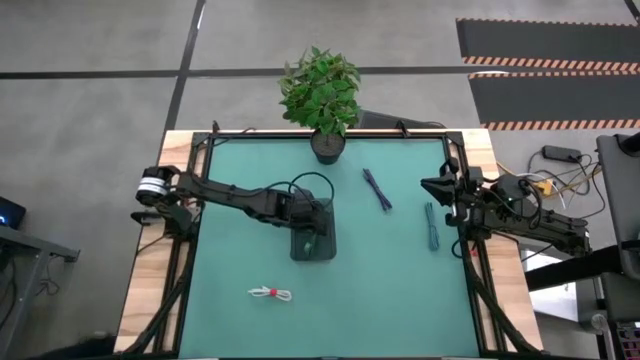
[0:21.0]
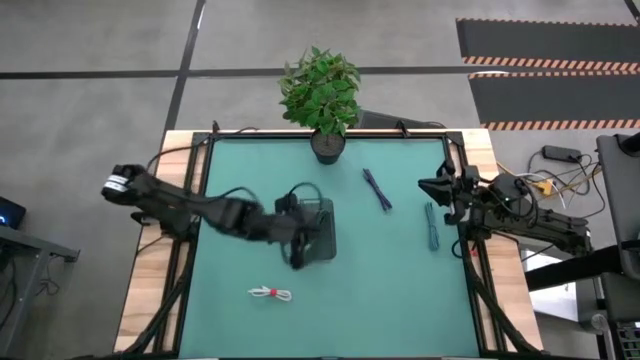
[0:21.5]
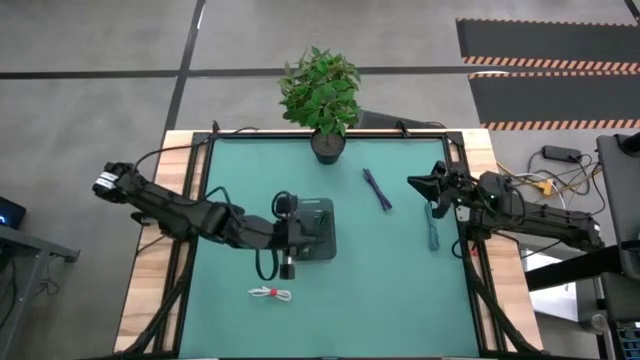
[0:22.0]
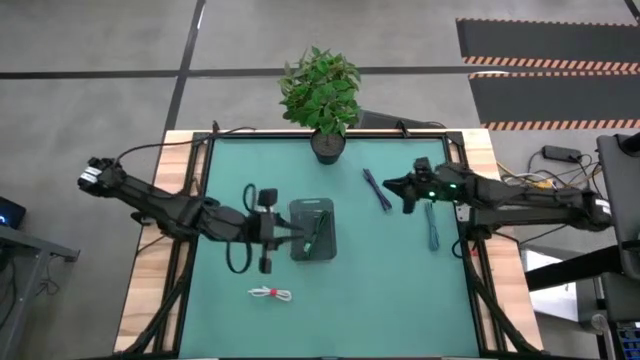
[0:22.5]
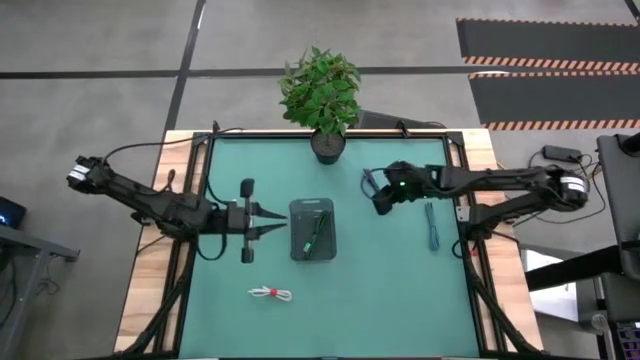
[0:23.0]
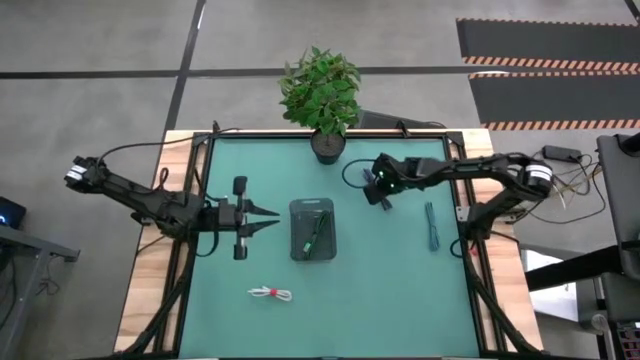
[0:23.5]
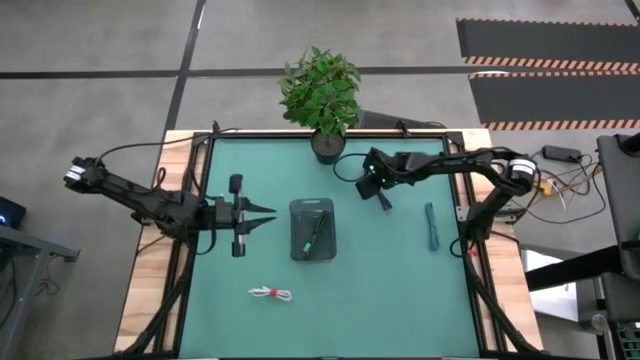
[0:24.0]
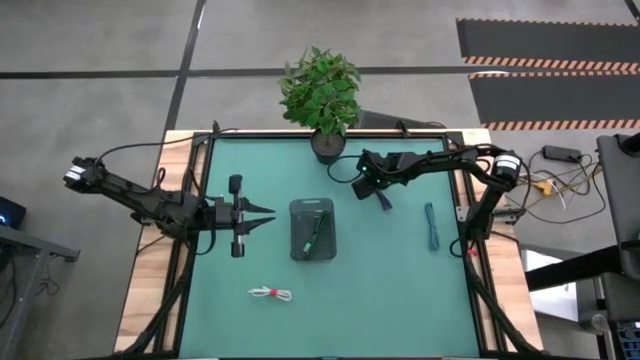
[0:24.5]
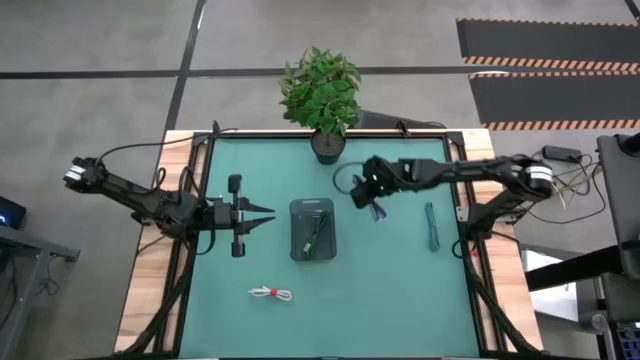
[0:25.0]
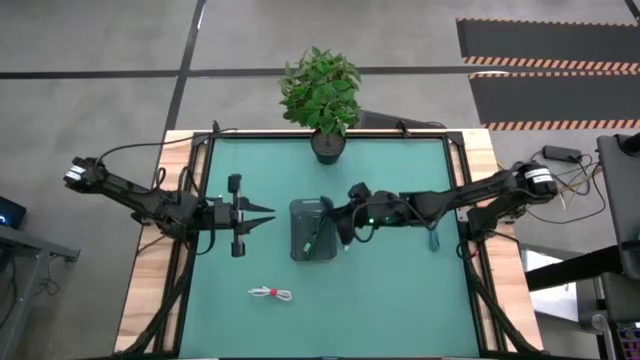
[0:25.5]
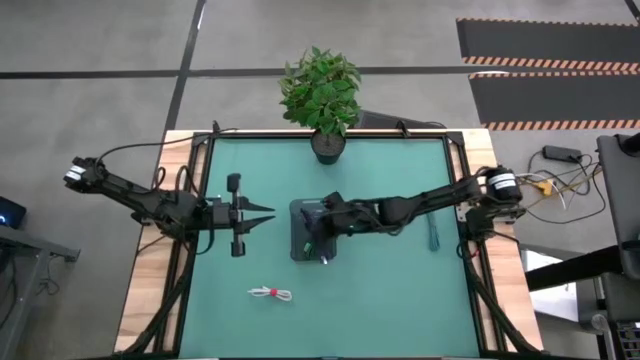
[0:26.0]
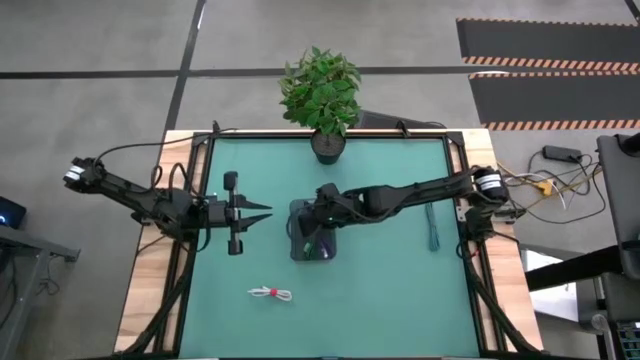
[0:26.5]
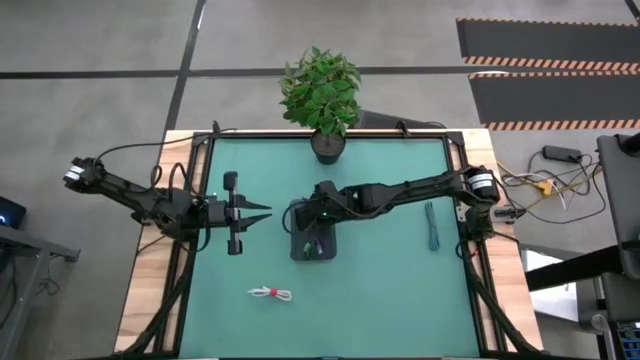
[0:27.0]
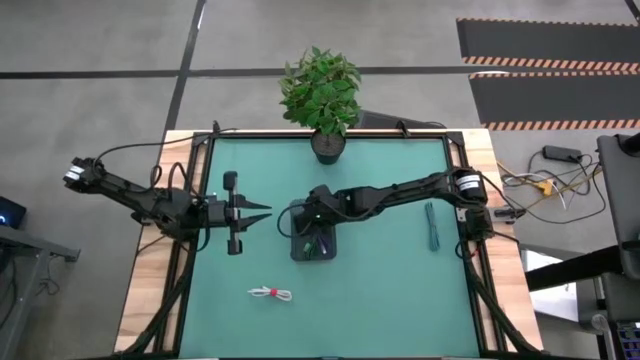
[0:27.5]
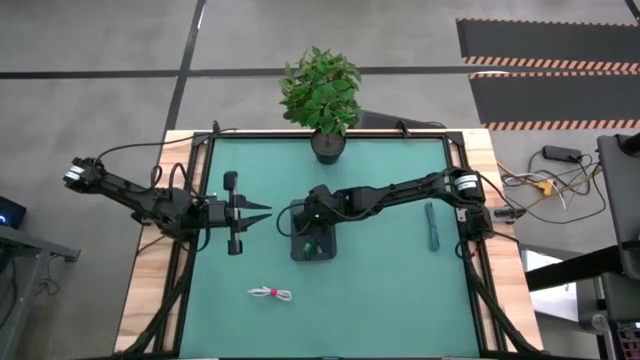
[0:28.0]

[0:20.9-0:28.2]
Task: Pick and place USB-C Cables
Put the violet charger cable into the black bin

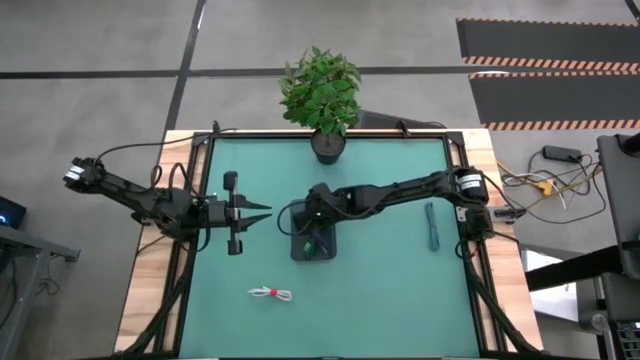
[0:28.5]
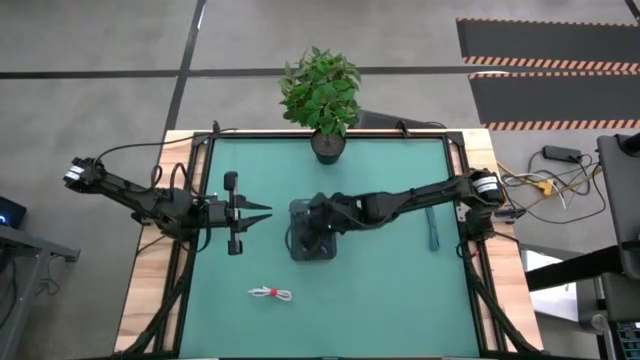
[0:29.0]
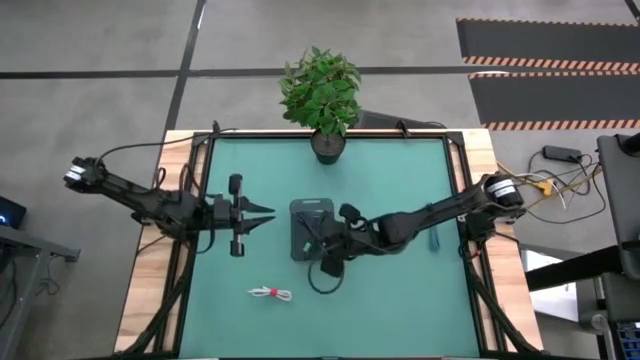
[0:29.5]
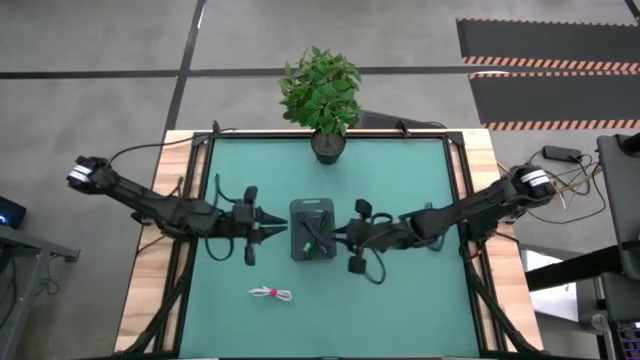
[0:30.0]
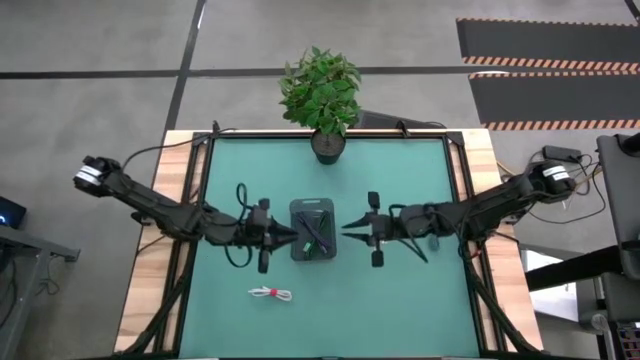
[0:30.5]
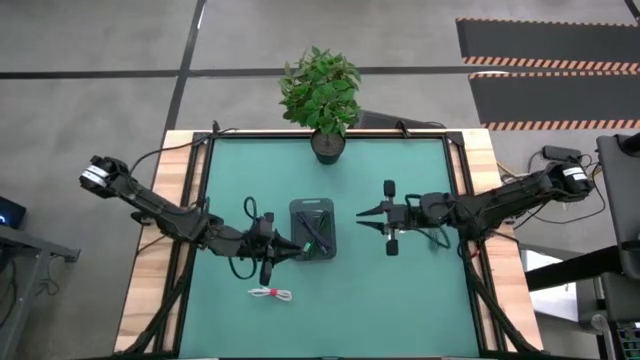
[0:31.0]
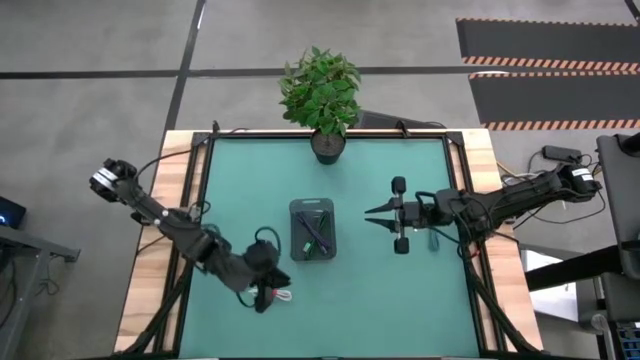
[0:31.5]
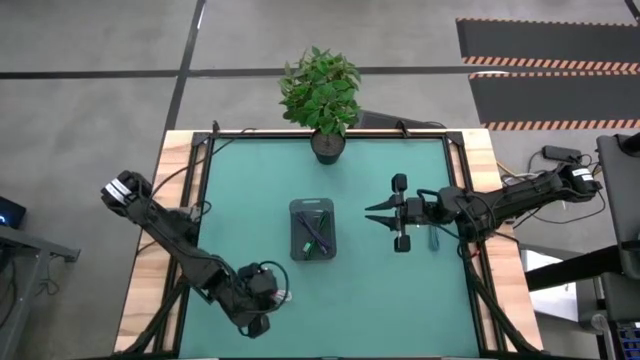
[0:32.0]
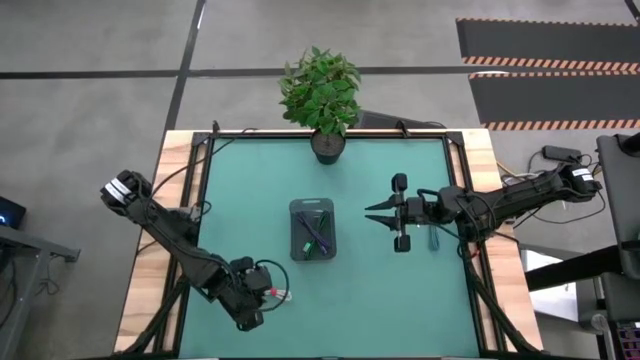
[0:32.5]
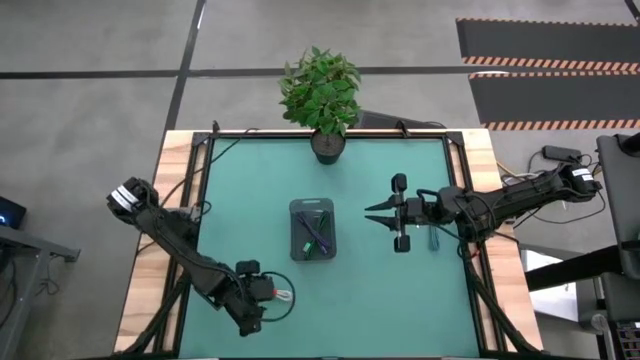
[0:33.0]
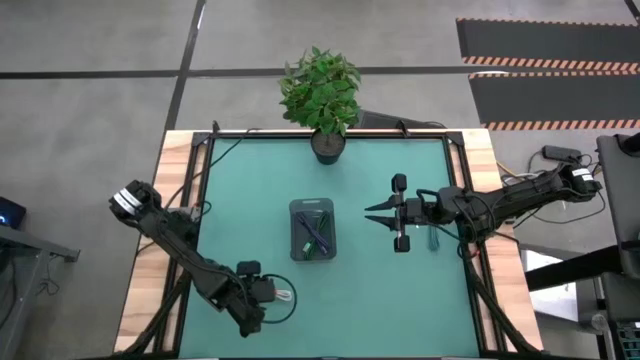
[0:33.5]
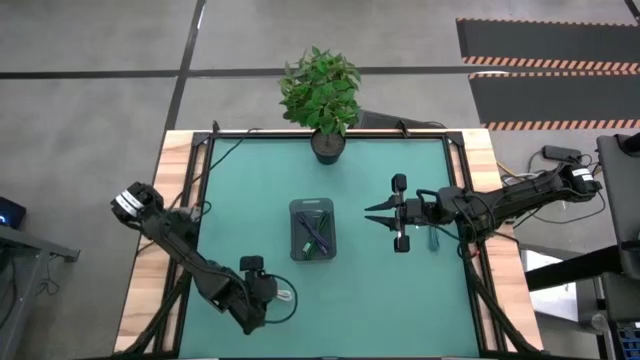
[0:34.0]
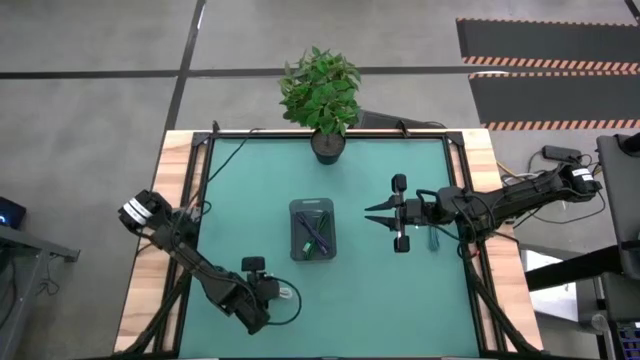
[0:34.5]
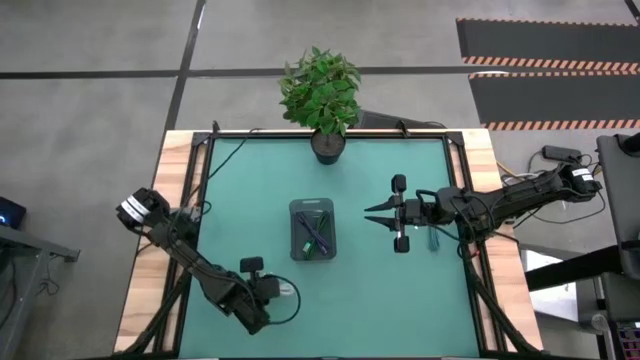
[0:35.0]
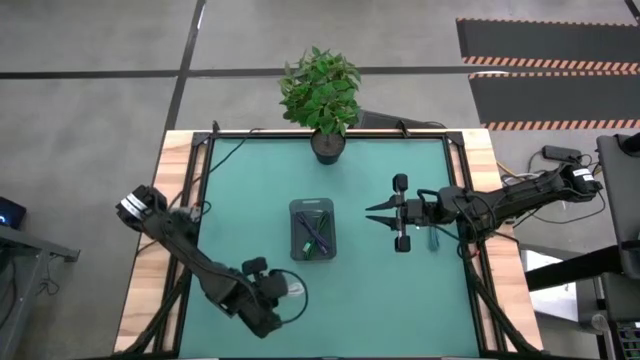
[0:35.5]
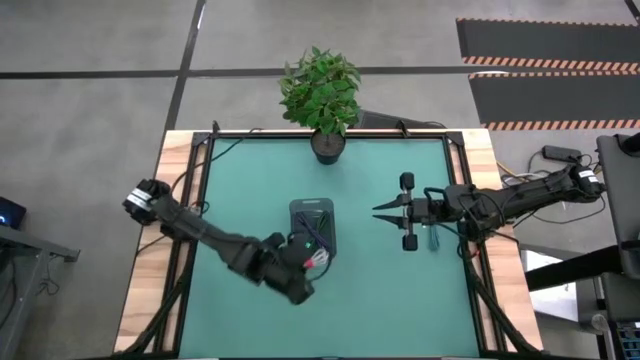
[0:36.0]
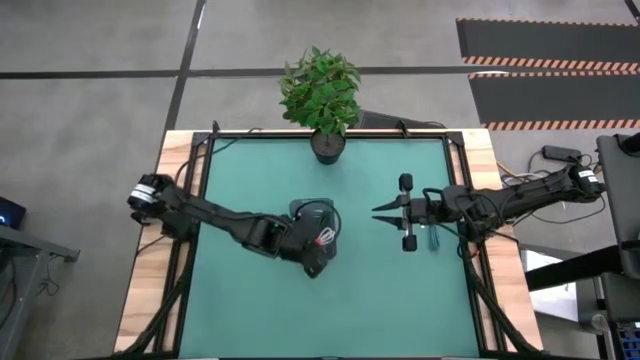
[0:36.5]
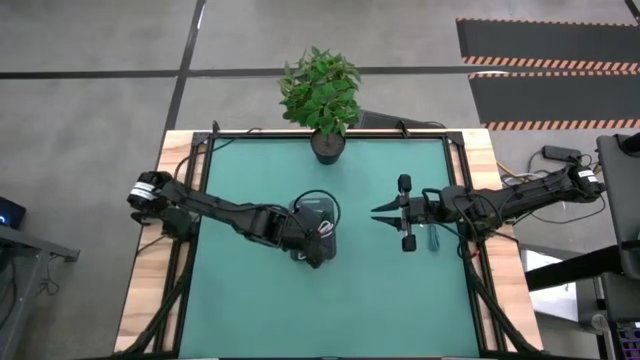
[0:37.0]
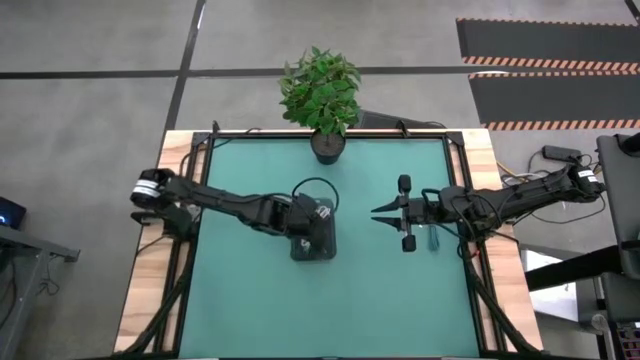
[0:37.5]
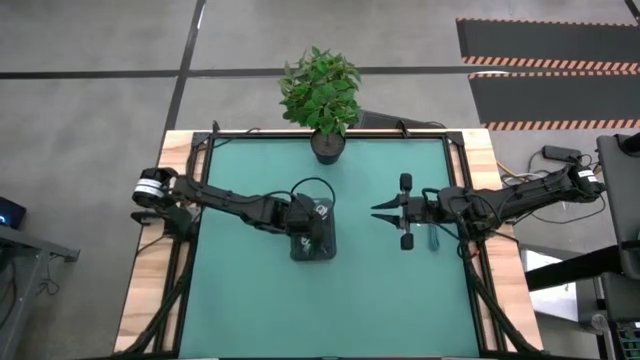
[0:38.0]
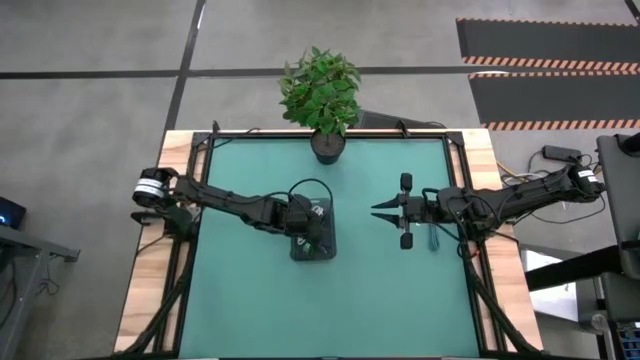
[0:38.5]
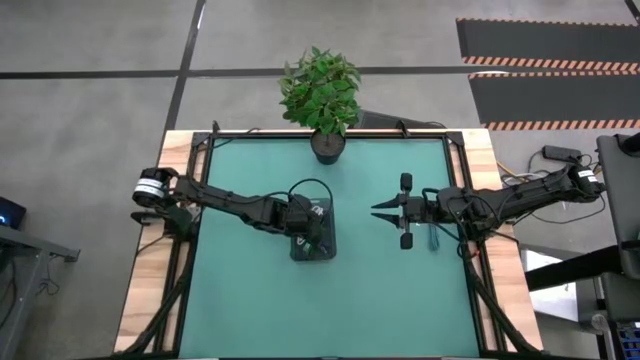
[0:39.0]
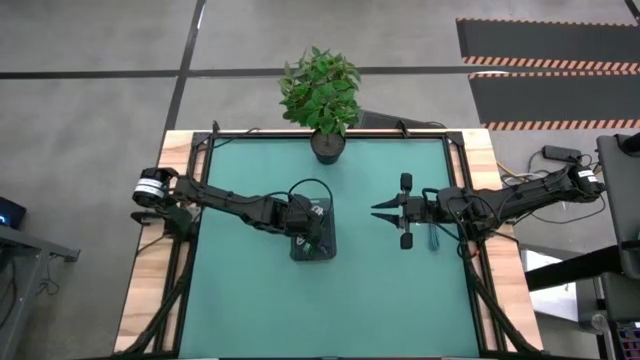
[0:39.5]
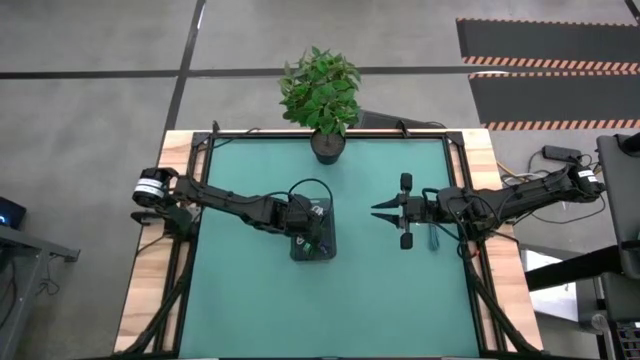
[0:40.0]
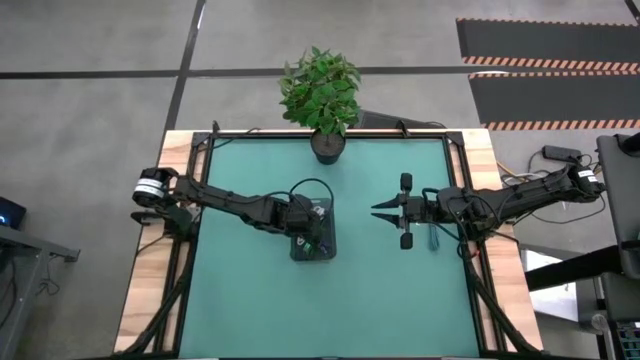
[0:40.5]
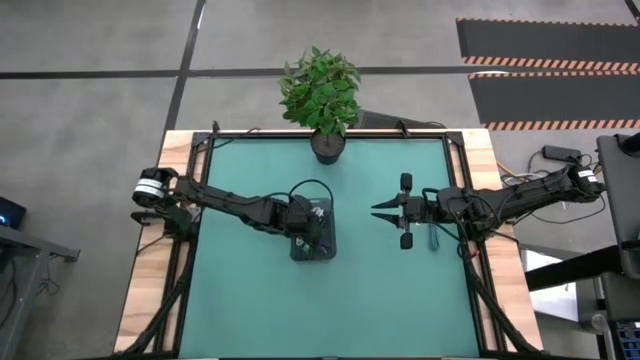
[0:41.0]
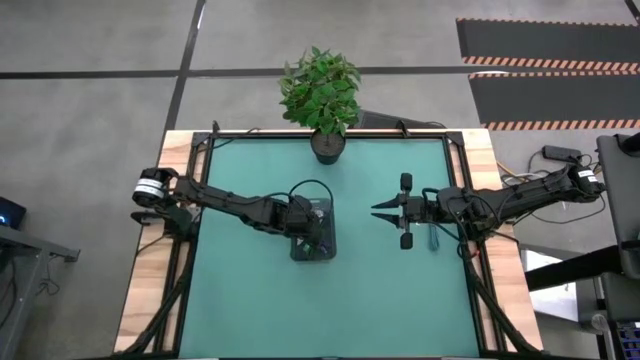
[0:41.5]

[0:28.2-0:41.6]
Put the white charger cable into the black bin
